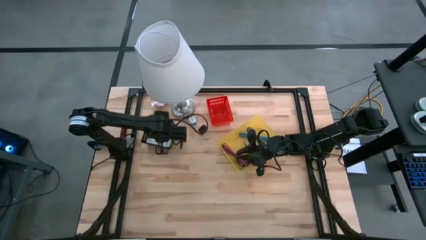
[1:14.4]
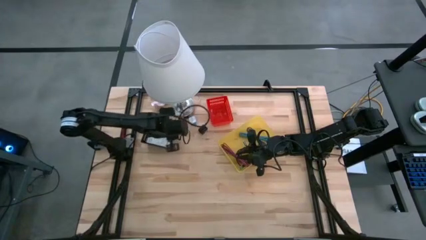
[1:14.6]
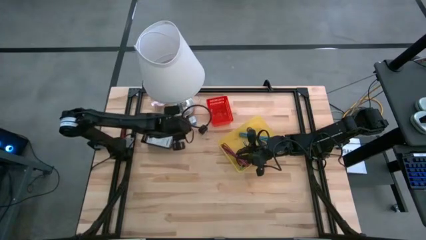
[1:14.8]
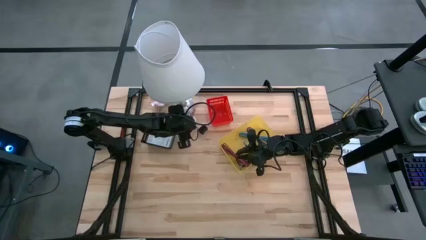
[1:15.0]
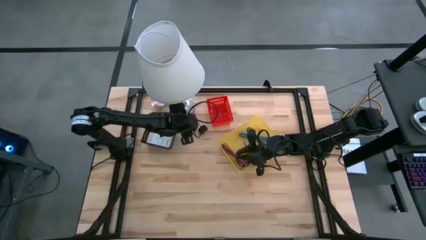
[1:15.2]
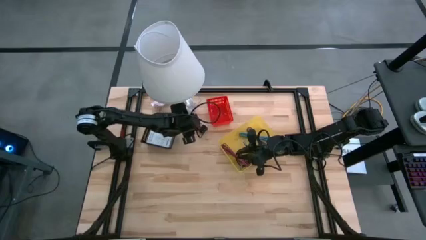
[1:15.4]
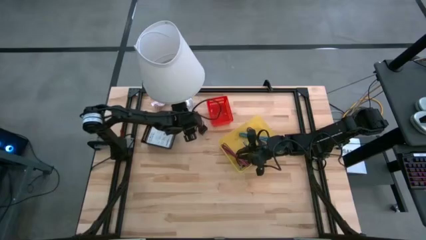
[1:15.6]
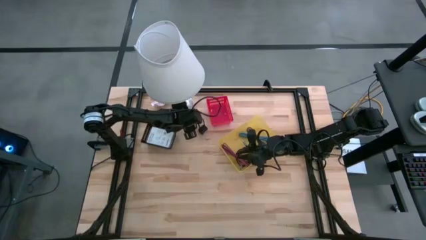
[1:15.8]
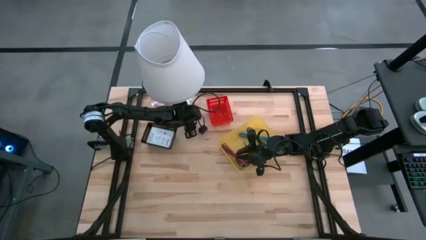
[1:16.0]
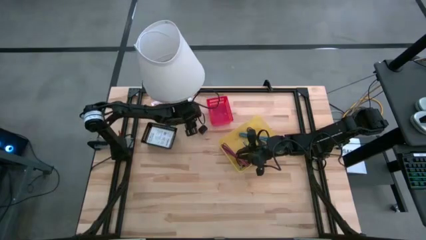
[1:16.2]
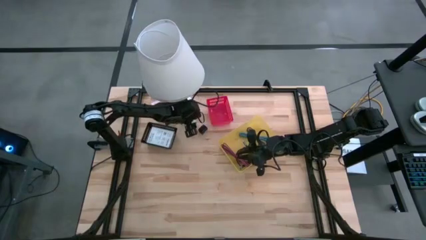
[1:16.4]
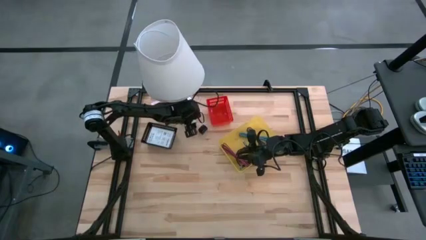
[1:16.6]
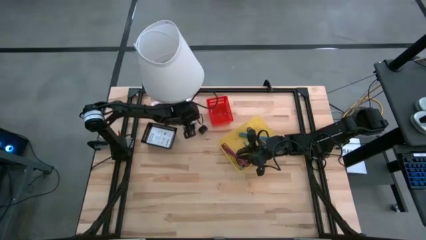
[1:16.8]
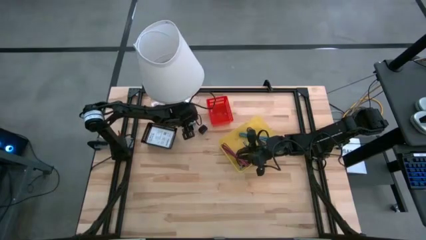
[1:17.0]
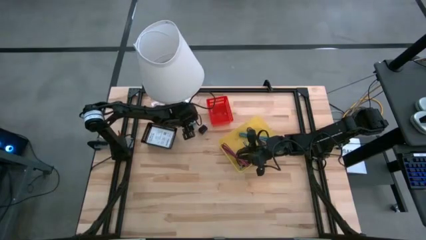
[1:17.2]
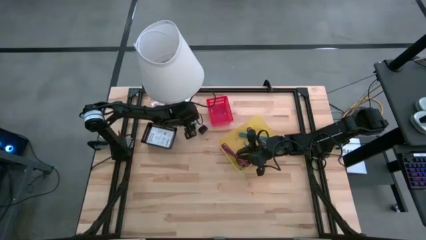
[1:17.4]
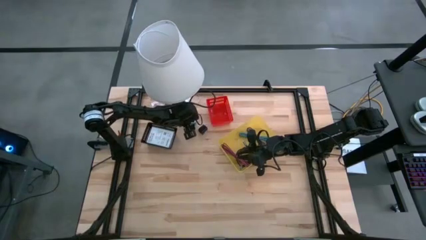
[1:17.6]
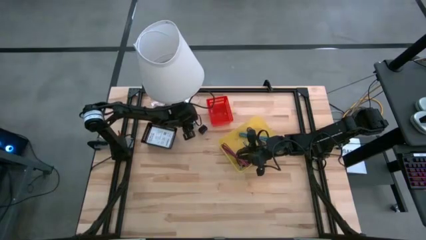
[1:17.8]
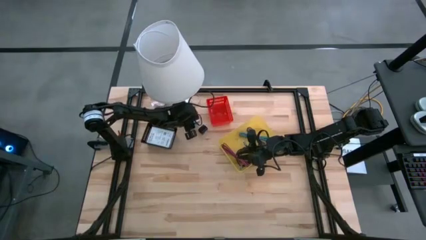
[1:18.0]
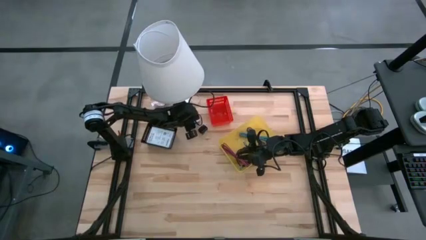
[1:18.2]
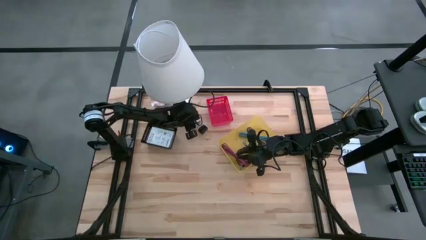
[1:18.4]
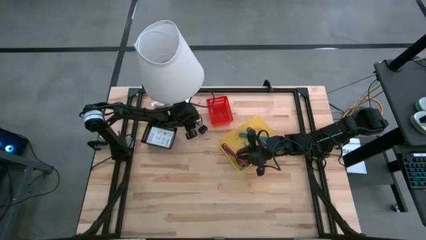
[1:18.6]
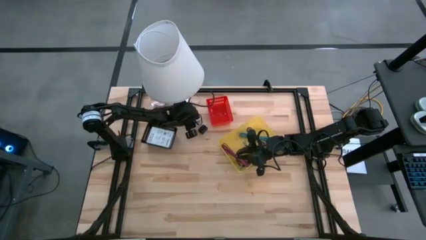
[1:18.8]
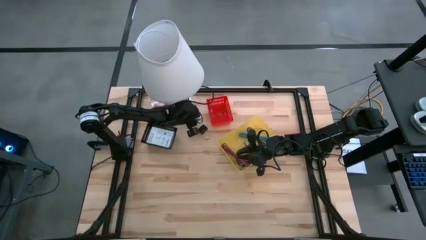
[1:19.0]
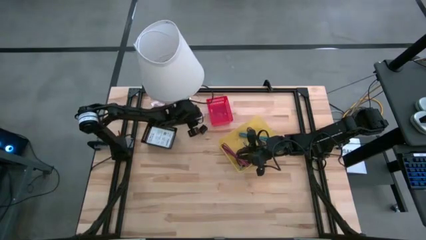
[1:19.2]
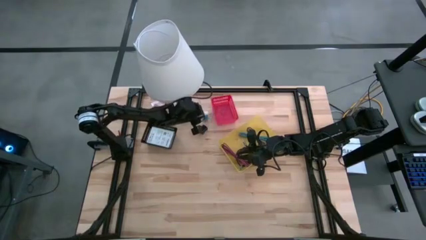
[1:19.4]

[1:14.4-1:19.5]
Task: Pick and place items into bin
Put the blue charger adapter into the red bin

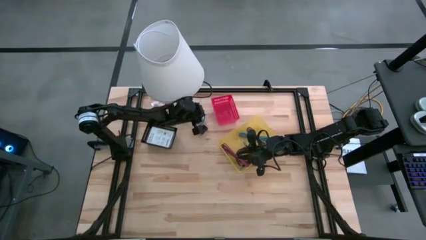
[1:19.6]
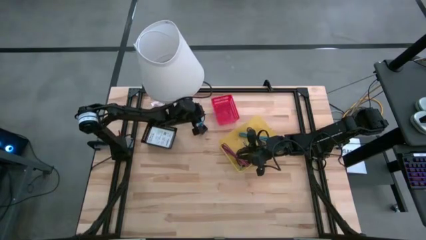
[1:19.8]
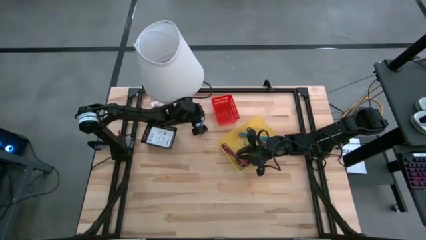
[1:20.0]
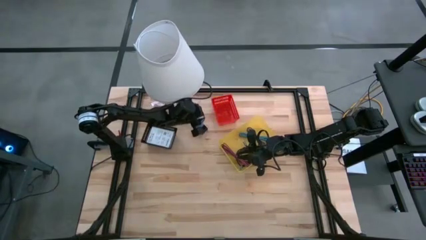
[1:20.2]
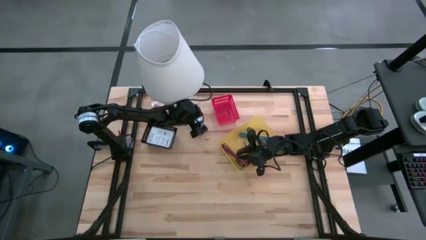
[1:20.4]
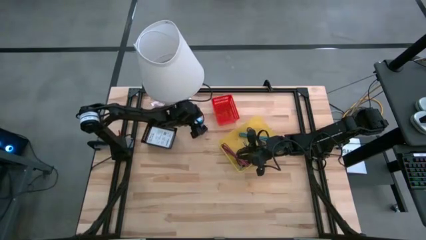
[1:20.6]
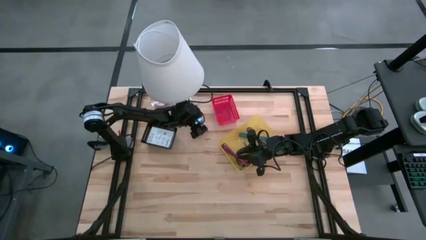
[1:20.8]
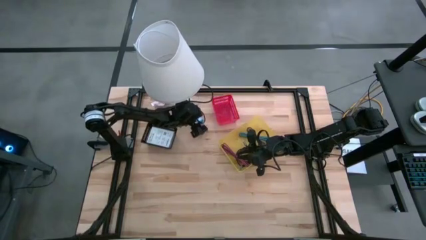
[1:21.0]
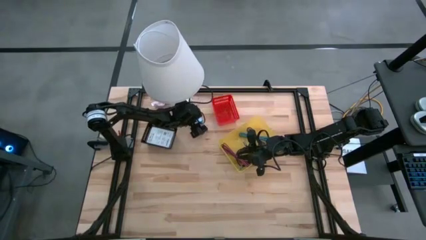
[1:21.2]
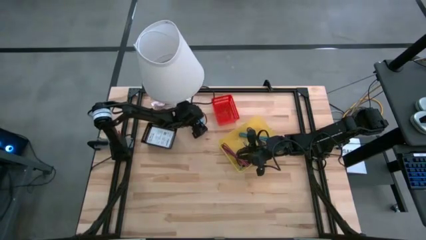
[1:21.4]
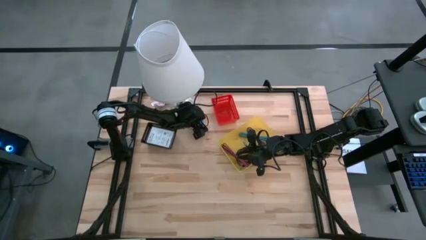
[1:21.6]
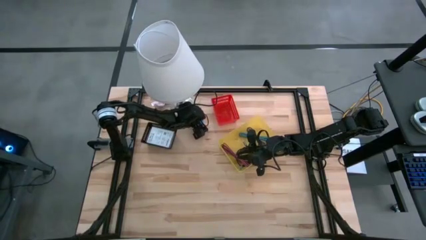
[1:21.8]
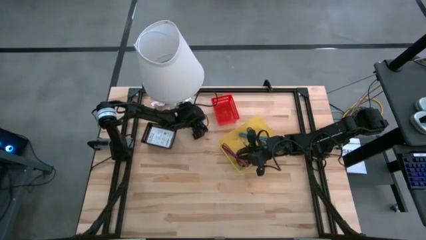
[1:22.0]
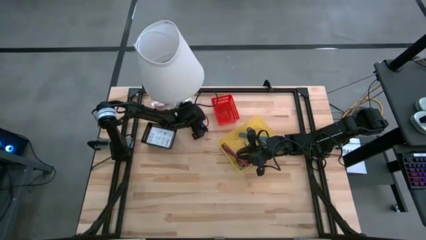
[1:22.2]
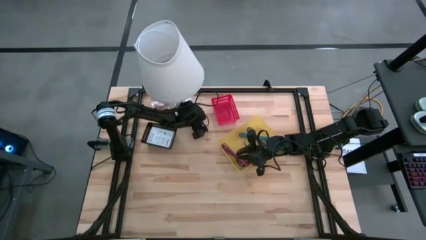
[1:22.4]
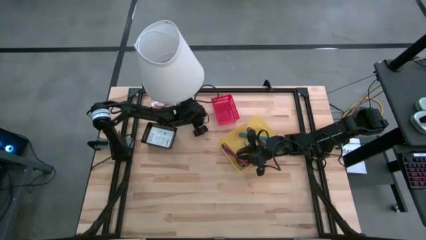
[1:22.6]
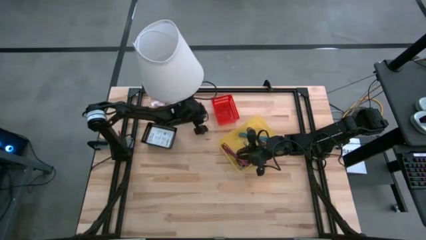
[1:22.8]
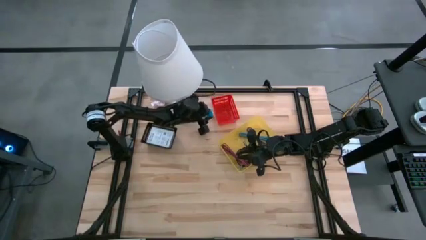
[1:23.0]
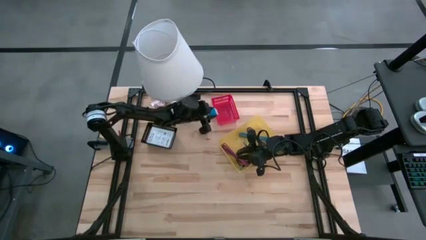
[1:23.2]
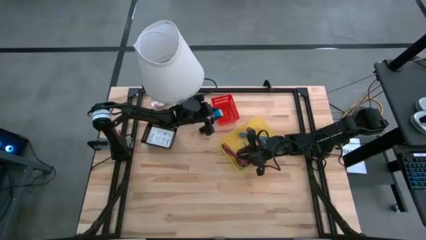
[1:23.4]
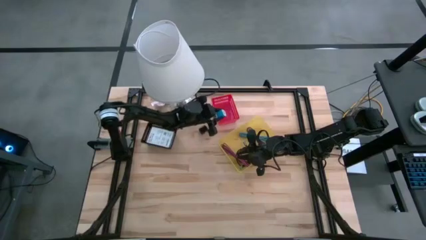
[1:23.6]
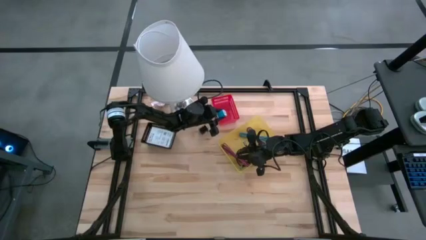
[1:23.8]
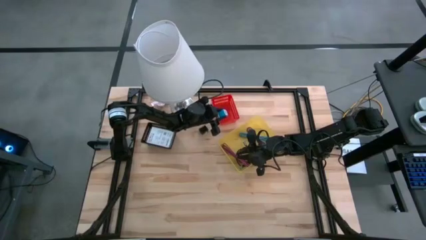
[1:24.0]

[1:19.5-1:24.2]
Put the blue charger adapter into the red bin

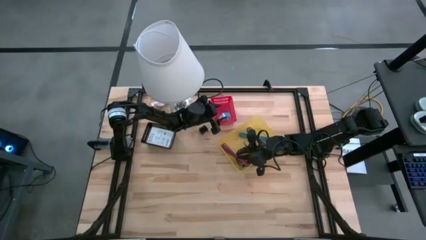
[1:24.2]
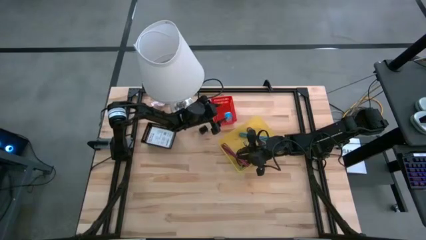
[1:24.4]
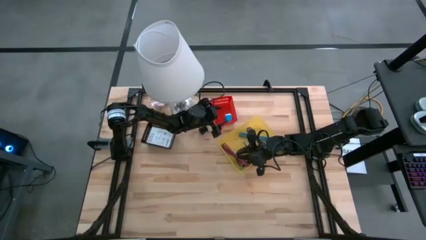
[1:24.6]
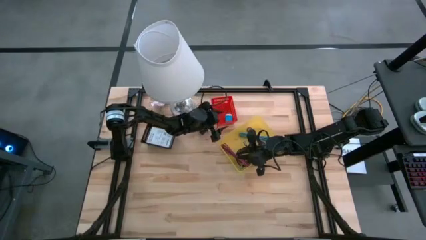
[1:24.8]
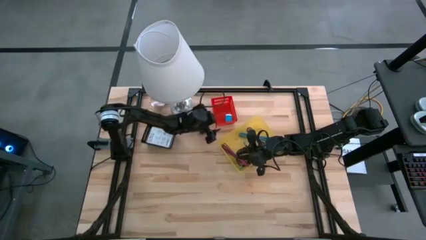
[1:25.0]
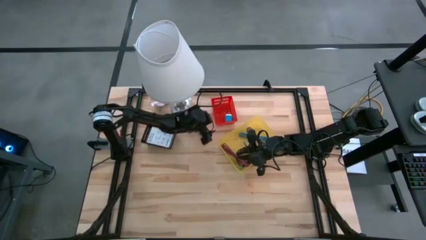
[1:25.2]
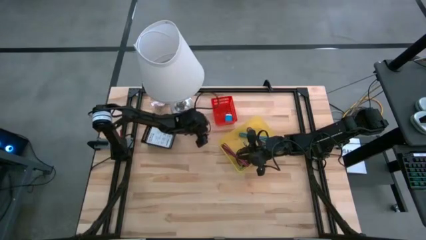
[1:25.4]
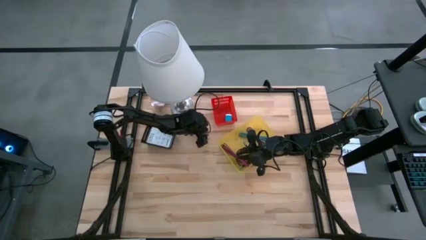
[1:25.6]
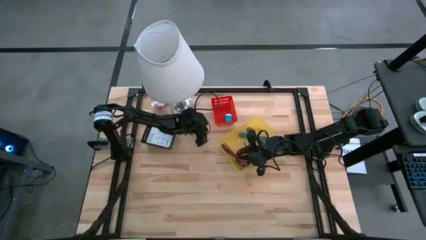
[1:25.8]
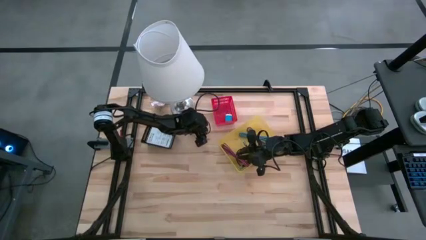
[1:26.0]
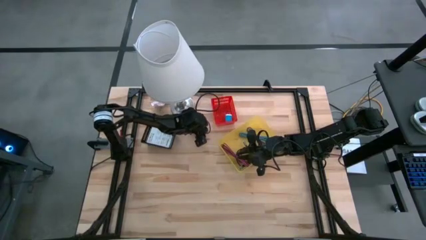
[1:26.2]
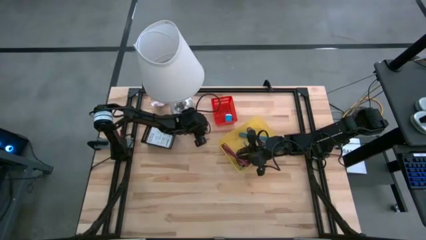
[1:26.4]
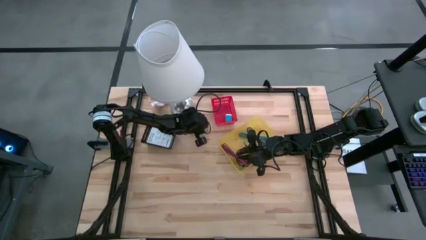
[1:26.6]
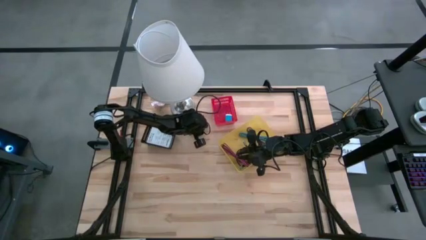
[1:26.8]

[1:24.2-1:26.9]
Put the black charger adapter into the red bin

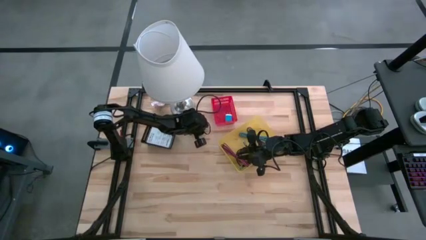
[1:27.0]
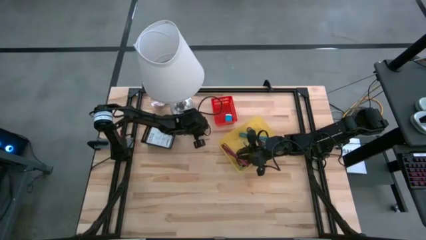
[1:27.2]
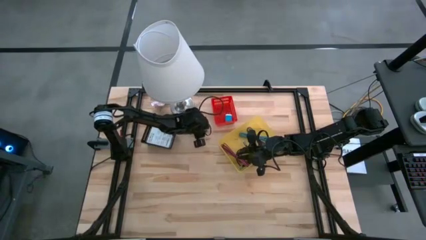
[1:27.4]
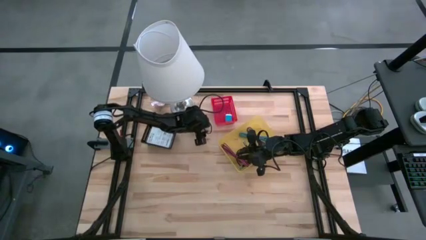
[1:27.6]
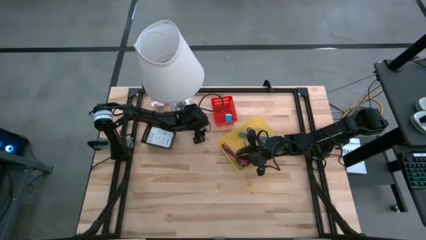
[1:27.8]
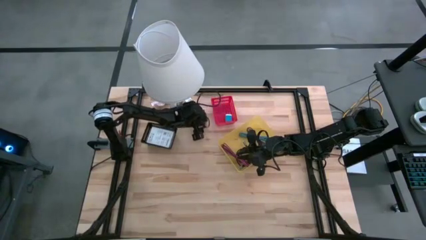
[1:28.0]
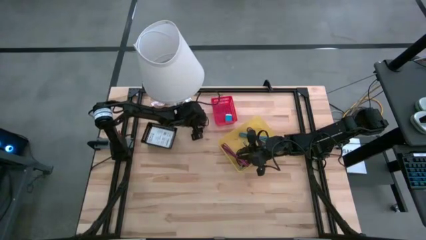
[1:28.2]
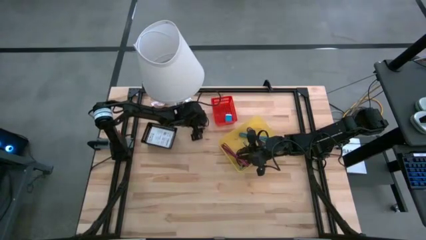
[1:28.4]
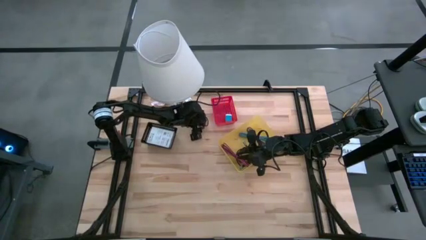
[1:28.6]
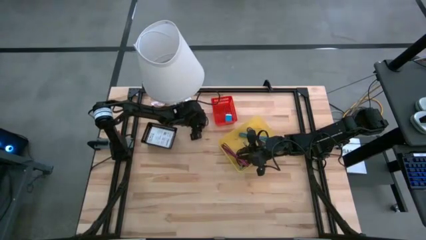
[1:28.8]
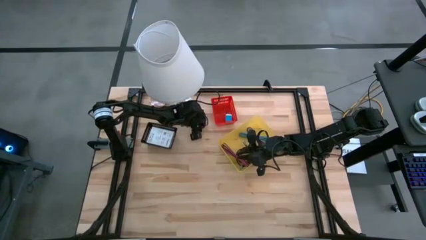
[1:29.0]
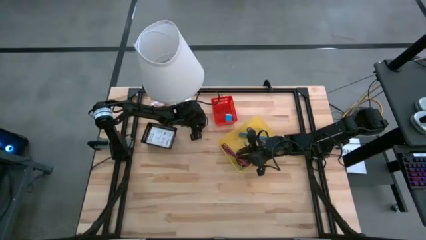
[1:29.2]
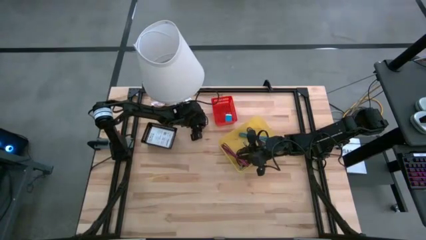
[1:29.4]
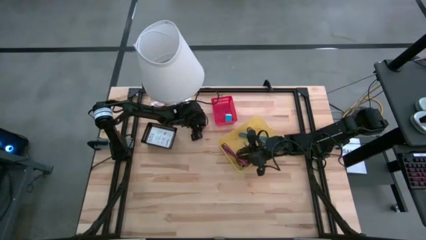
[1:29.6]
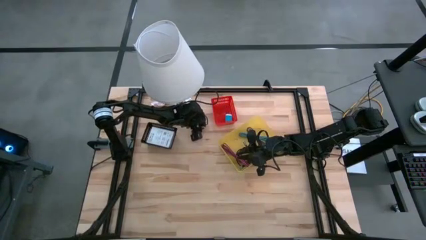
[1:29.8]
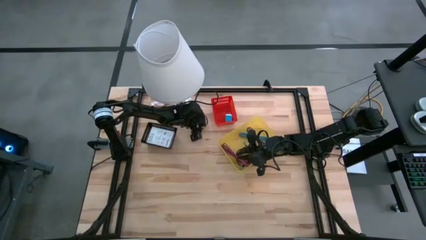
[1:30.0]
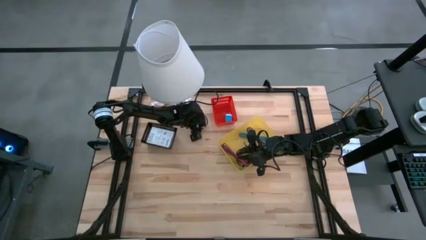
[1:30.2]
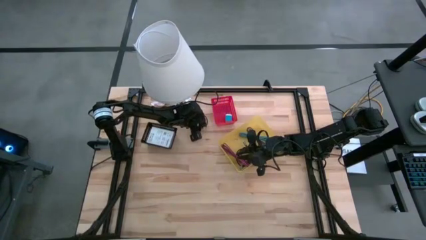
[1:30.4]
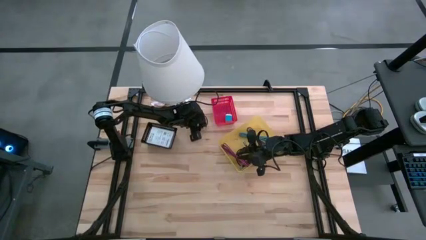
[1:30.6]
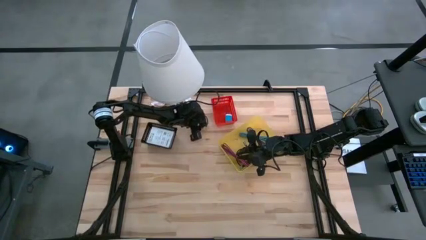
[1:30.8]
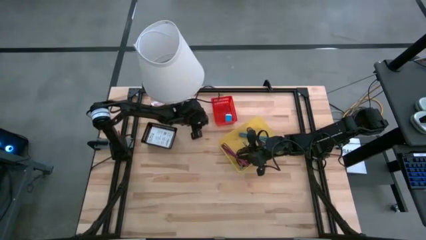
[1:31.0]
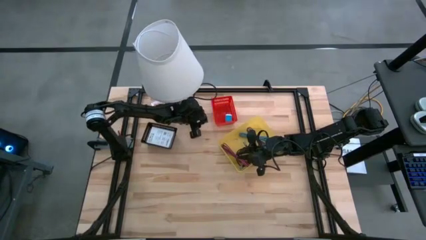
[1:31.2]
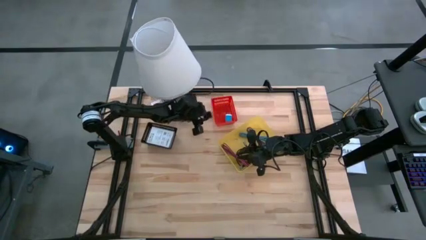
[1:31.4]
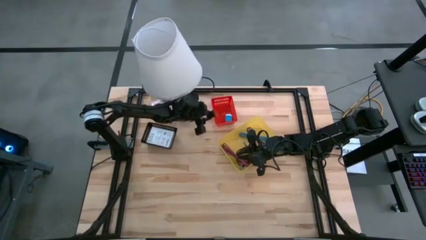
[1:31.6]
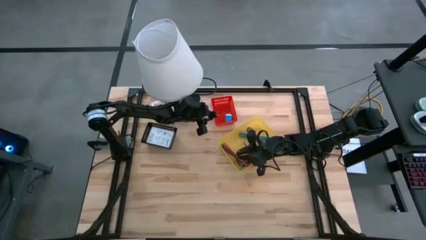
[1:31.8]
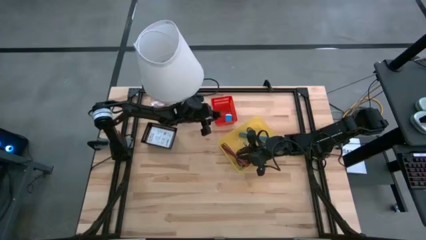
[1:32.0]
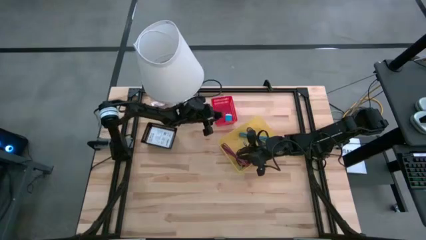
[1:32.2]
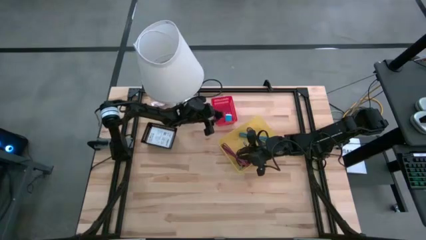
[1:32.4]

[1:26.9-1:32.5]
Put the black charger adapter into the red bin
